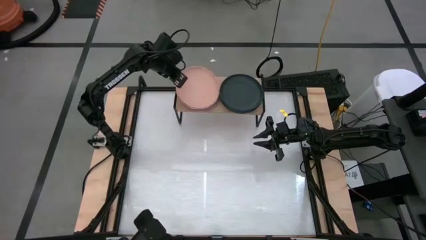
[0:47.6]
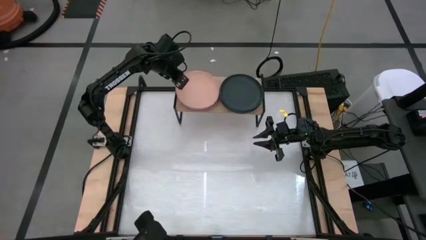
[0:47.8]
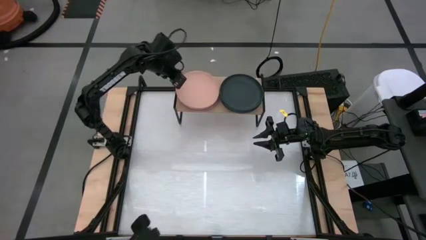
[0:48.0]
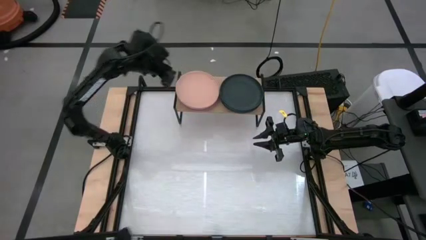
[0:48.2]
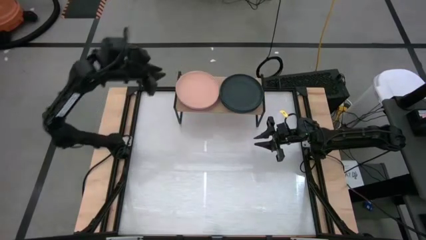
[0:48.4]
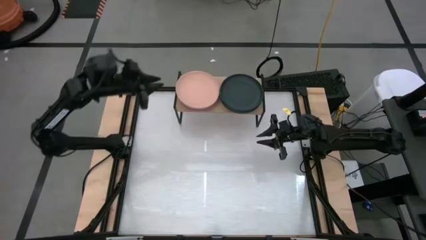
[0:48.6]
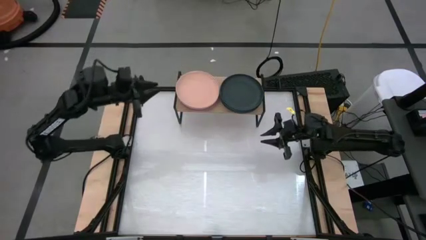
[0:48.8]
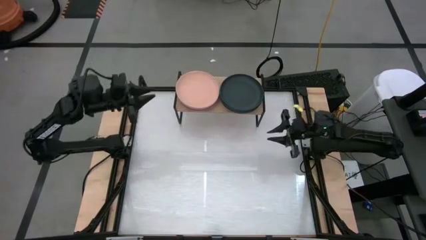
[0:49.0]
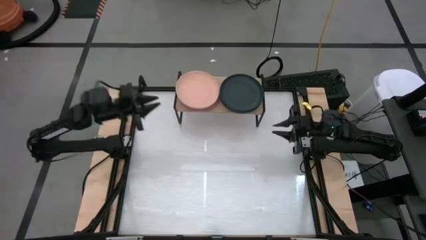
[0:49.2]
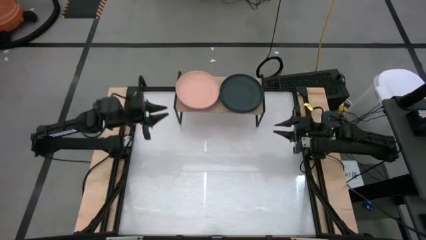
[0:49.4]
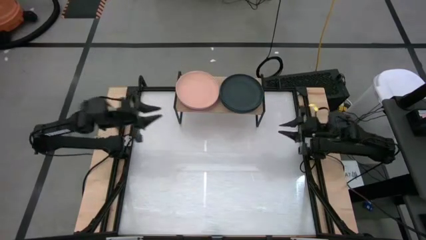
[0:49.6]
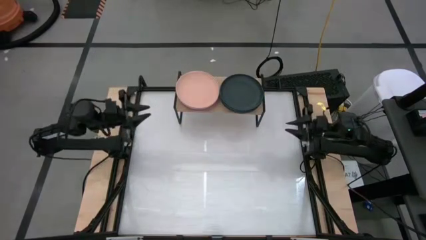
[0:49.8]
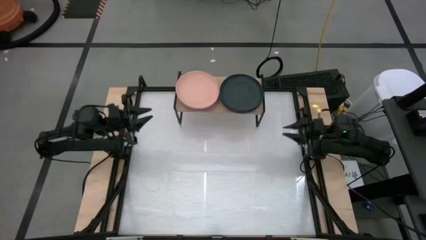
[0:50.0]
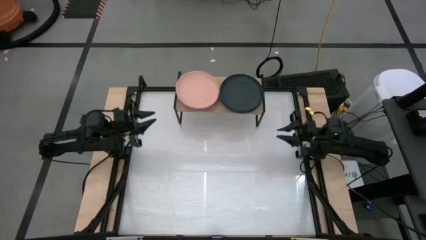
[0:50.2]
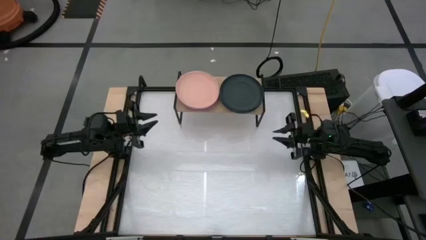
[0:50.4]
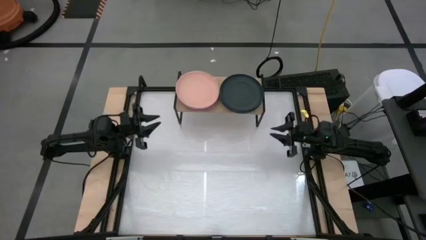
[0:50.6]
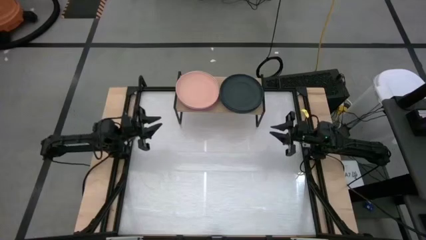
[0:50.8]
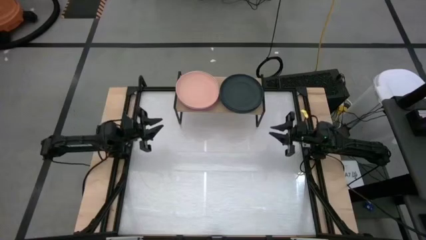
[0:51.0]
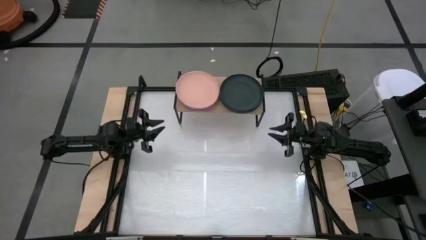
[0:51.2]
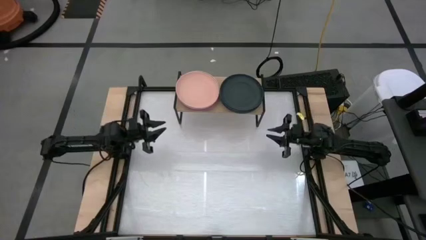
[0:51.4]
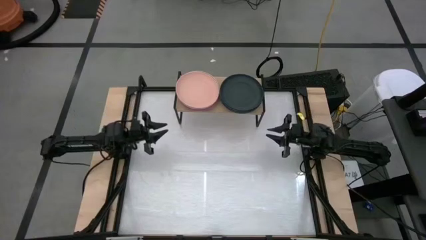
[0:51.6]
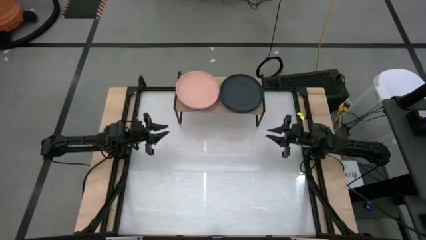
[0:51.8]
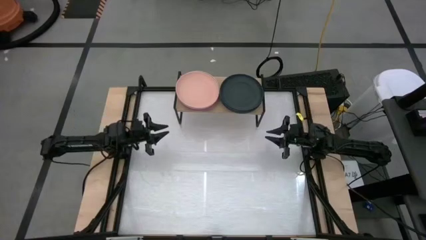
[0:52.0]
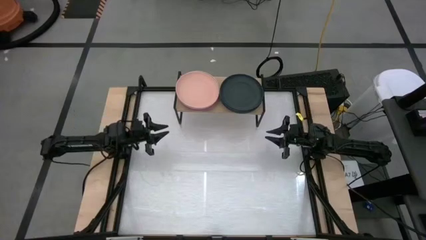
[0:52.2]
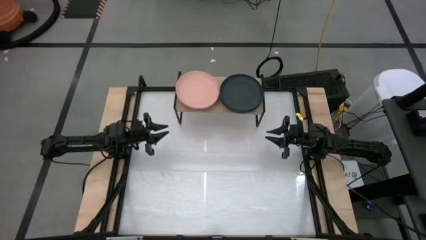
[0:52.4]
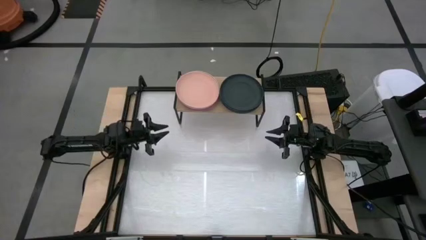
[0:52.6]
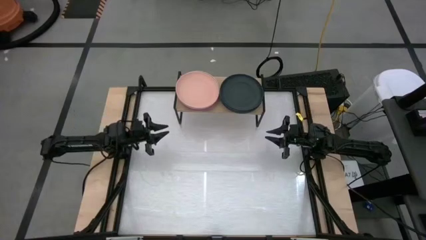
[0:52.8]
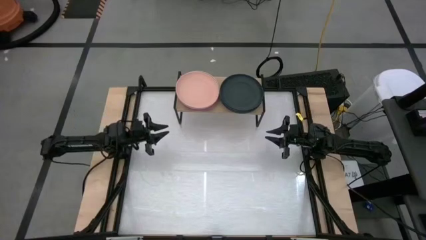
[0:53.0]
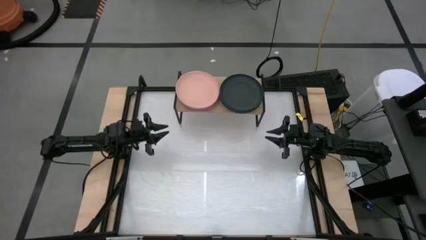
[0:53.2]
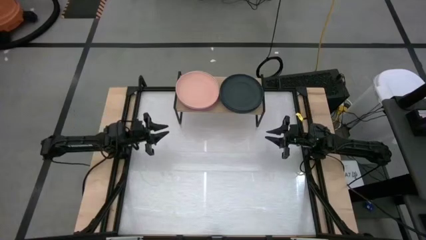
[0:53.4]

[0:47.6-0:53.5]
Task: Place and stack plates onto a shelf
Return to Home Position

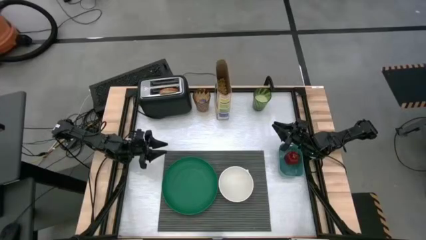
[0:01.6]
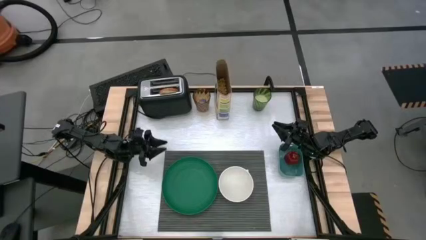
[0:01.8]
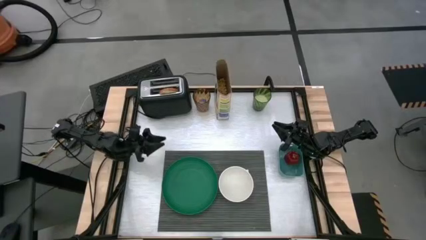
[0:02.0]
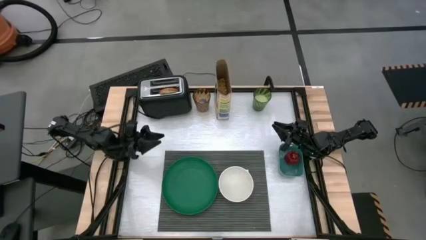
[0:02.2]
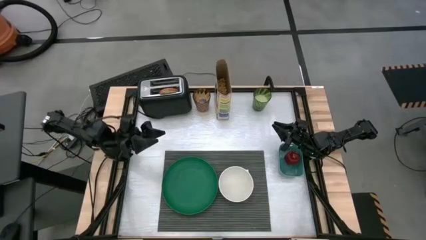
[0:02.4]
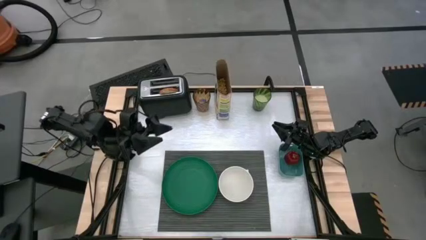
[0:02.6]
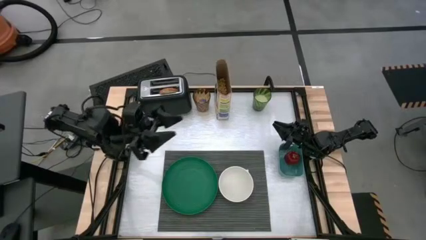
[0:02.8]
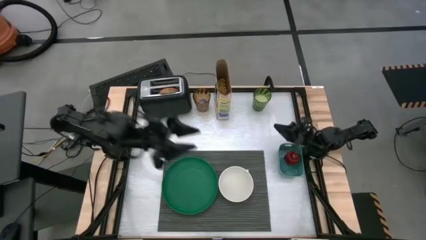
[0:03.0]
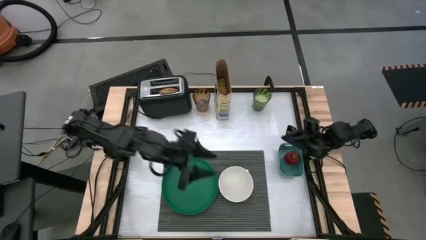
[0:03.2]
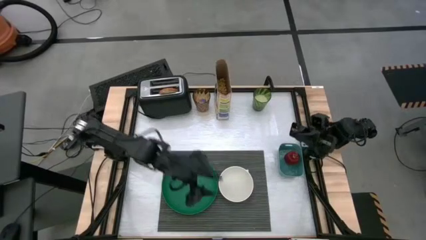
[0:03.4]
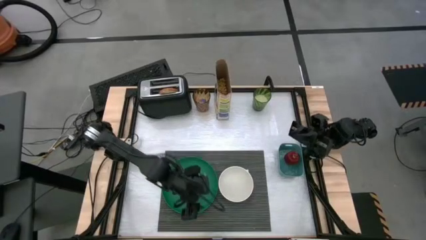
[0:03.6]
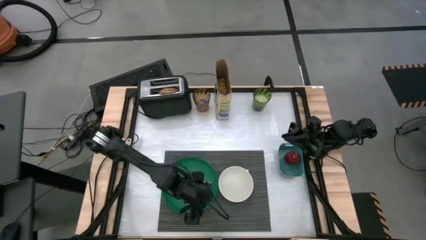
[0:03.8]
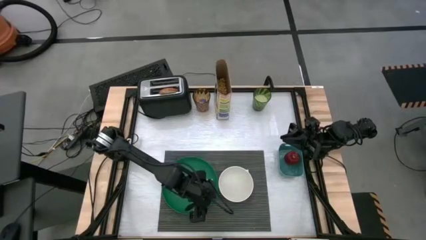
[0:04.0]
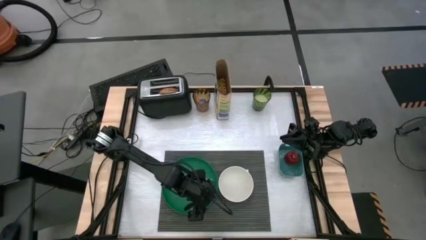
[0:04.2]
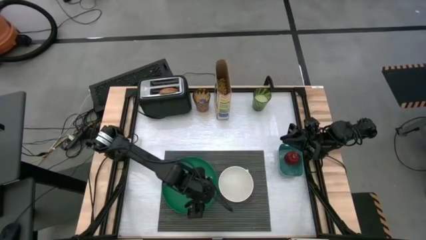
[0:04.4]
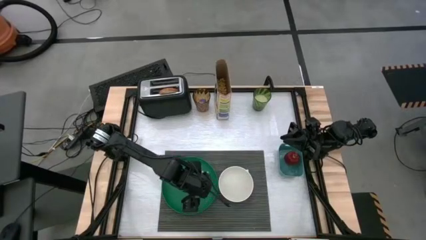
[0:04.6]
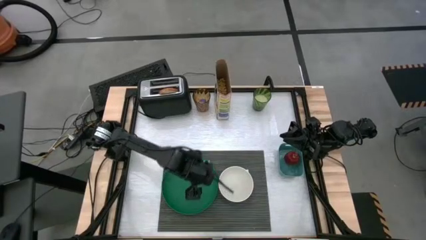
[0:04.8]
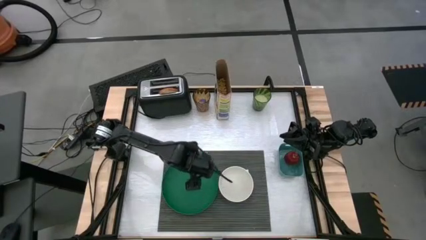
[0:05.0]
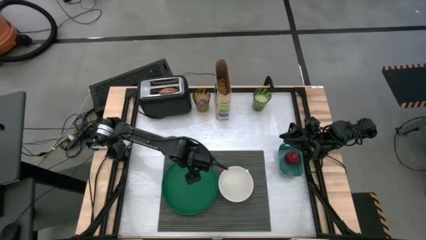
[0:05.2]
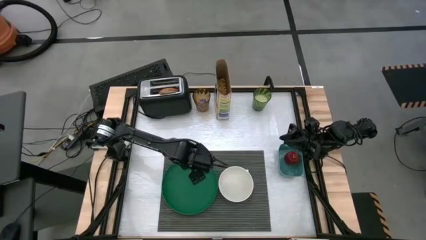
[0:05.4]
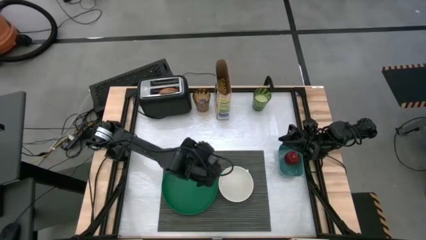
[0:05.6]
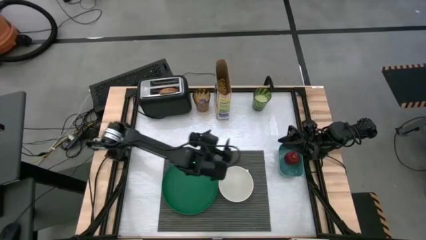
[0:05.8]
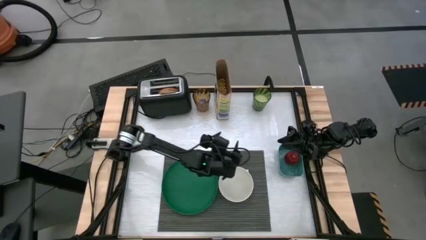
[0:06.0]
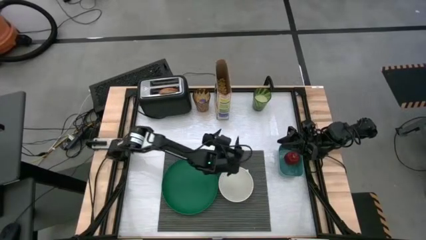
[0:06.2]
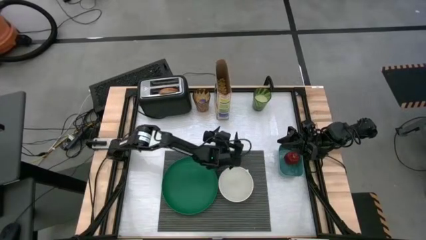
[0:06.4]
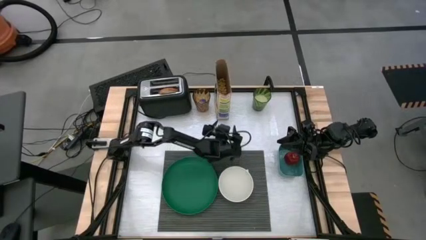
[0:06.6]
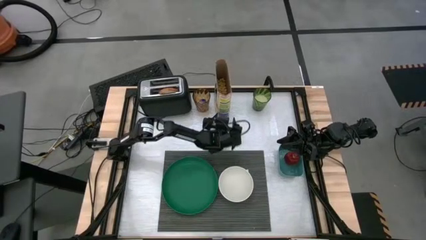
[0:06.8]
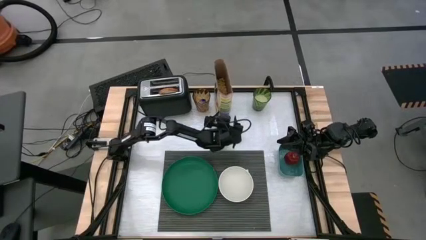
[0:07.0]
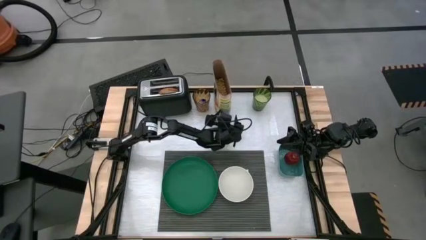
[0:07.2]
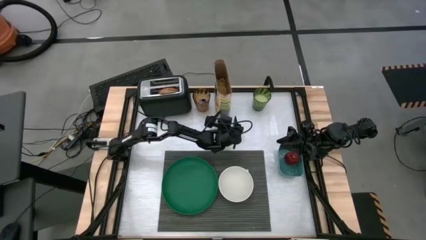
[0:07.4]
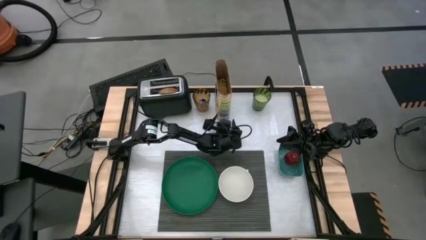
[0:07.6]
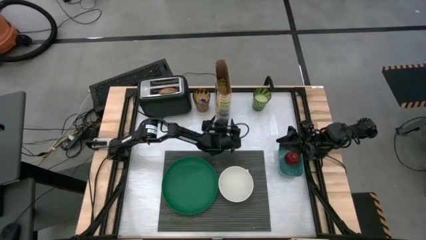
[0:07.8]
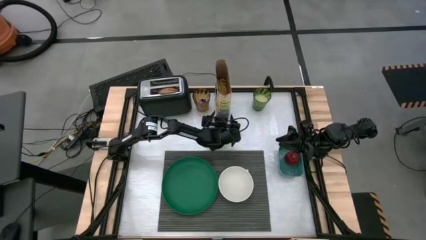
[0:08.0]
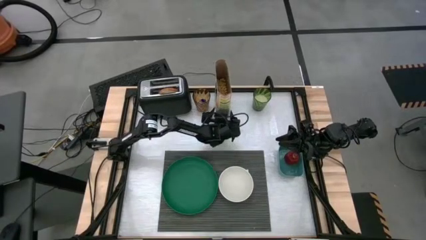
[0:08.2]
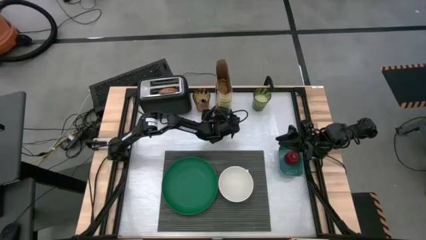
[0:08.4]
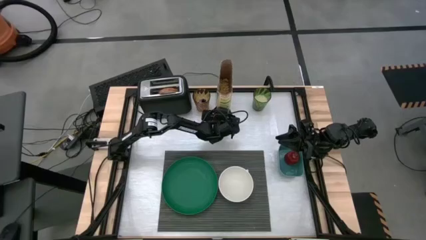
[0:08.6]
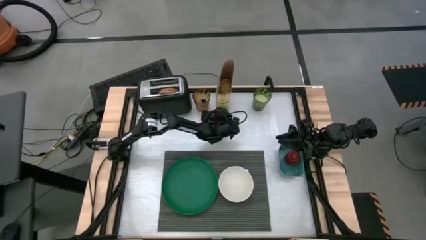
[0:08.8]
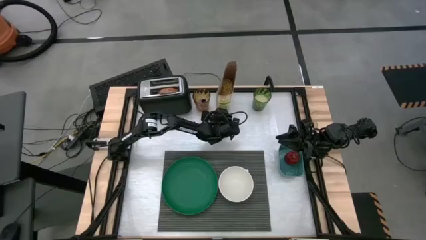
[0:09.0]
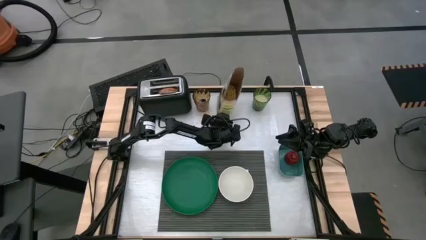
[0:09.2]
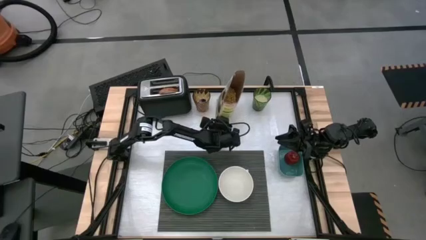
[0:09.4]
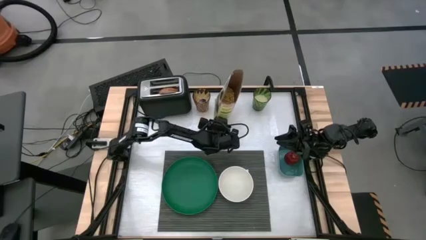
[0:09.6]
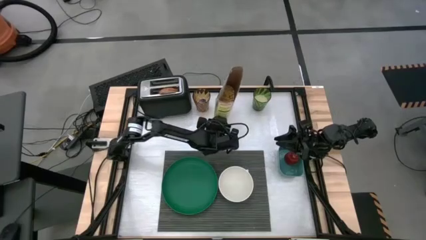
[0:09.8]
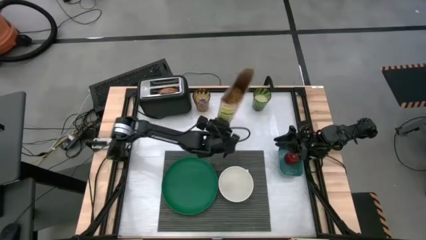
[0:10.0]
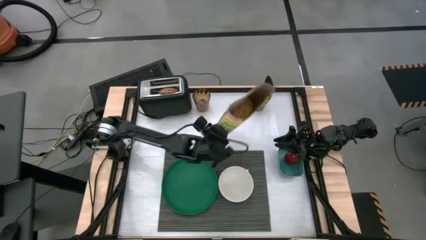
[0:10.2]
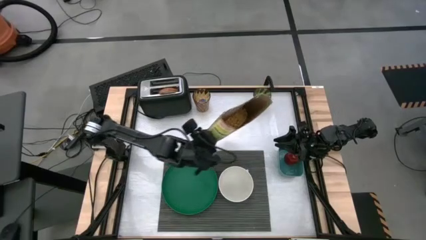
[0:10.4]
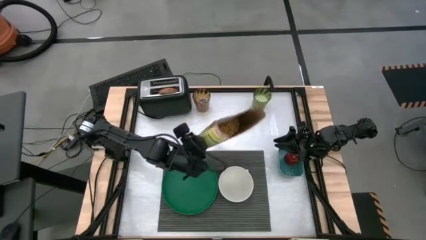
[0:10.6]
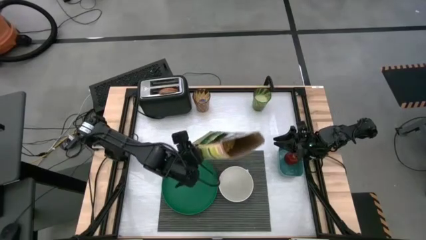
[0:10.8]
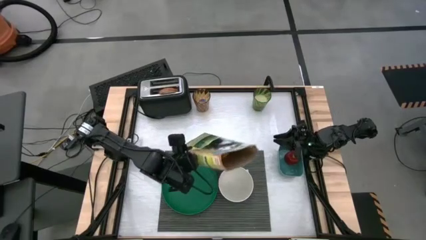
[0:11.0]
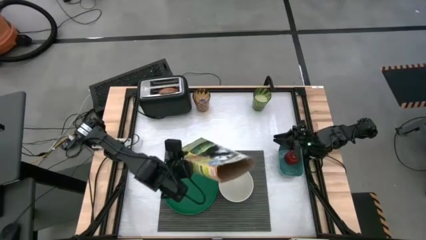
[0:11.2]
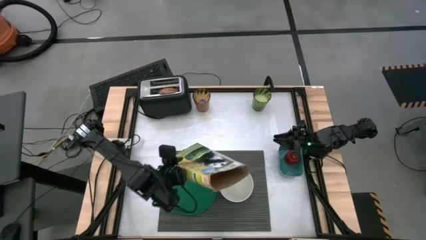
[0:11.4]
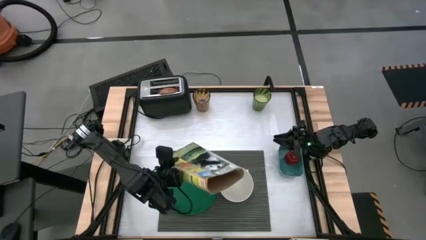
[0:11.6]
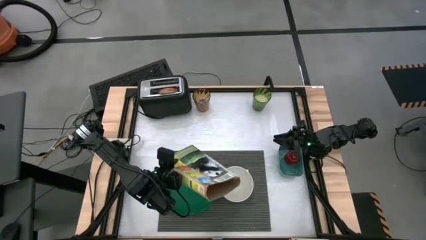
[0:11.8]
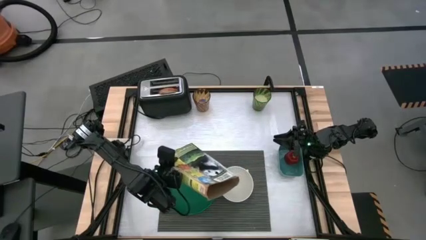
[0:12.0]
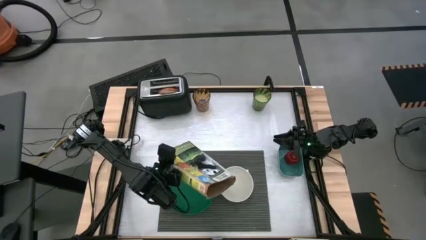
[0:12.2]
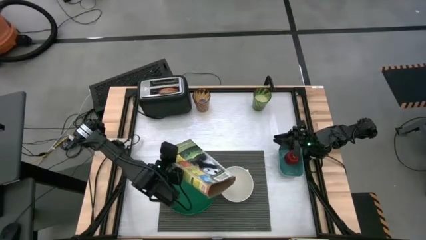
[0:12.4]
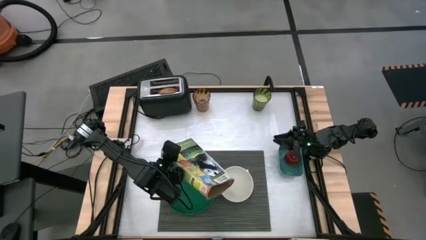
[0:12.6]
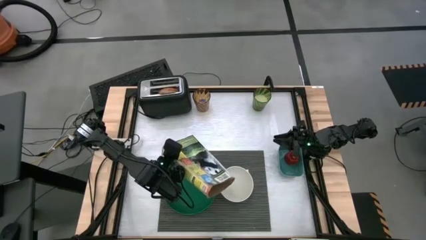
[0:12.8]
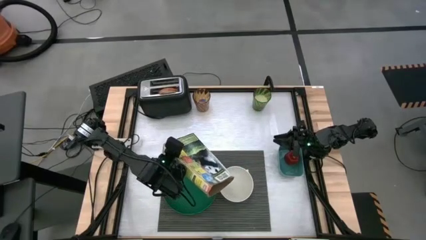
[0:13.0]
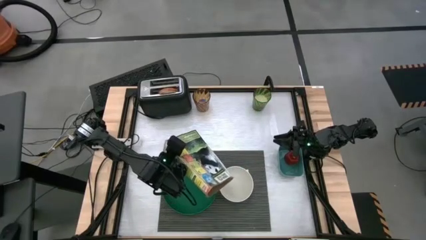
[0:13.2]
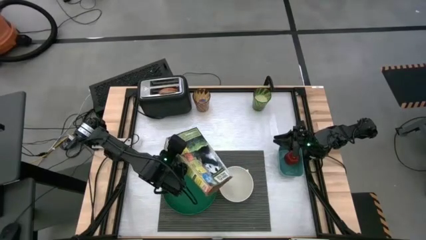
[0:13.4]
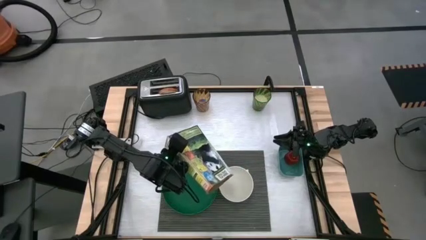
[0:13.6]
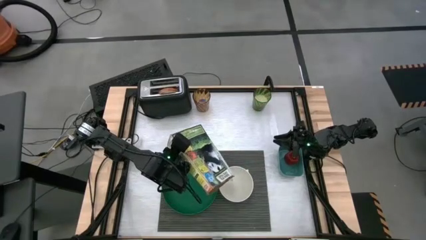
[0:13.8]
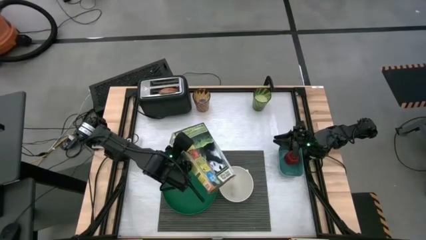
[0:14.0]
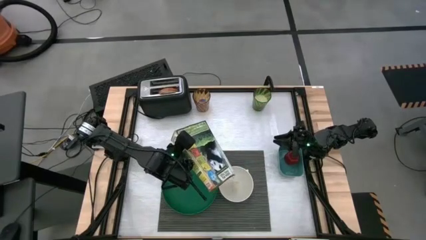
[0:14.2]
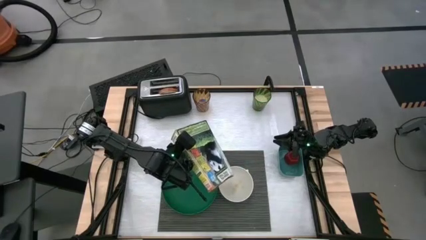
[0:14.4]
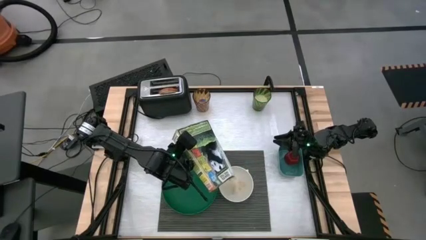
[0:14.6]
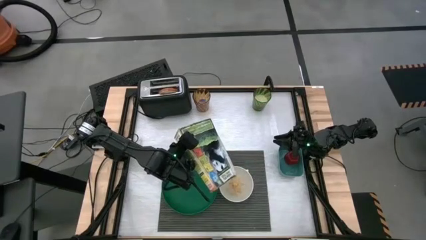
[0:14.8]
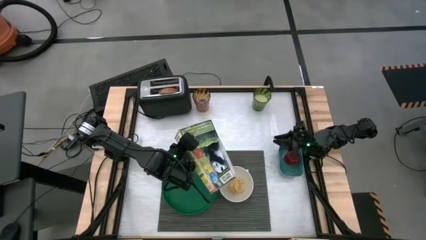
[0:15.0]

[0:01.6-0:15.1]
Task: Arrange a breakfast setting
Pour the cereal into the bowl
